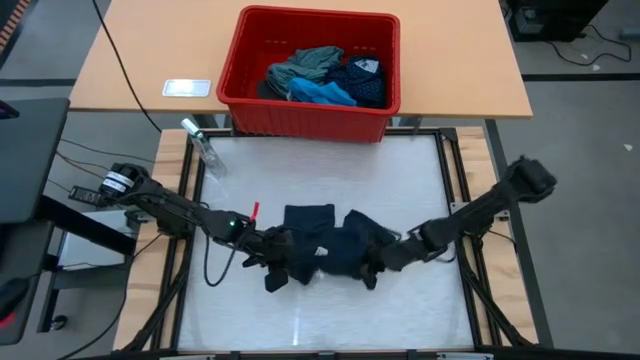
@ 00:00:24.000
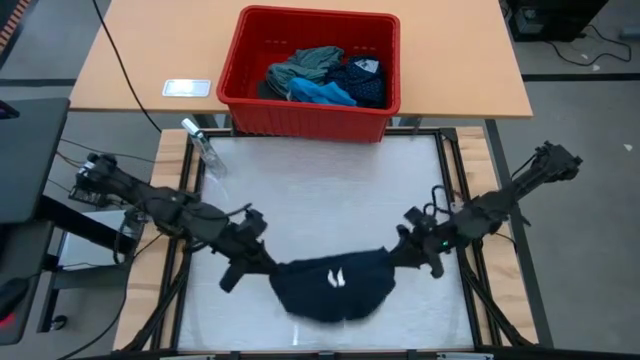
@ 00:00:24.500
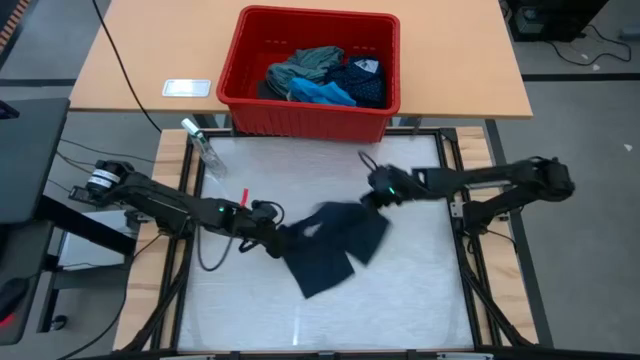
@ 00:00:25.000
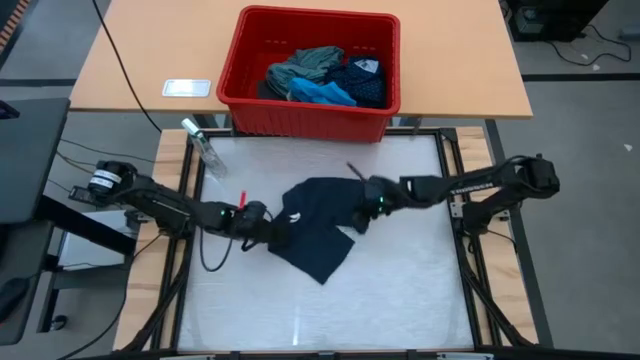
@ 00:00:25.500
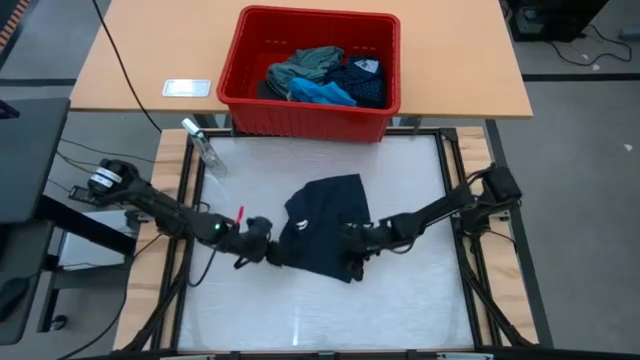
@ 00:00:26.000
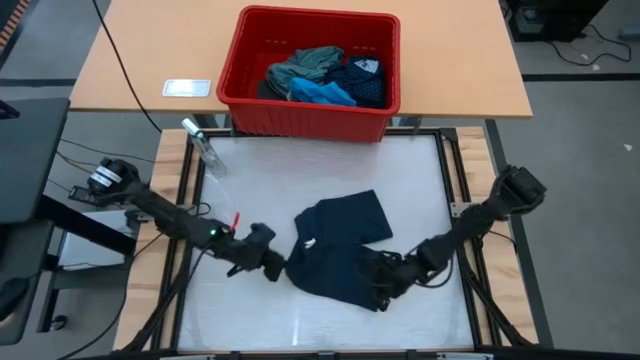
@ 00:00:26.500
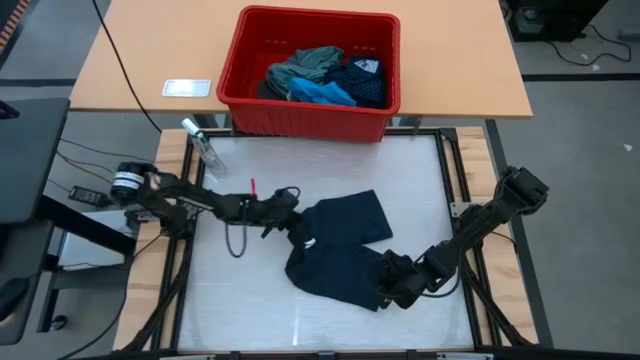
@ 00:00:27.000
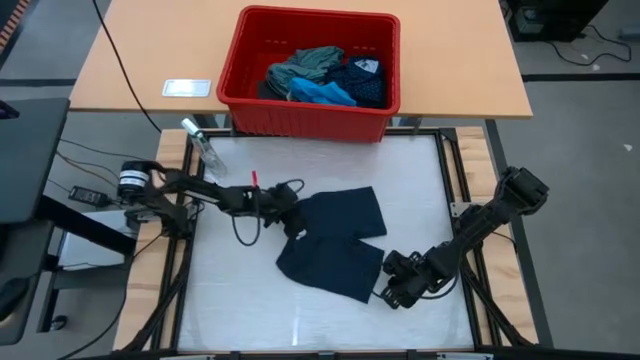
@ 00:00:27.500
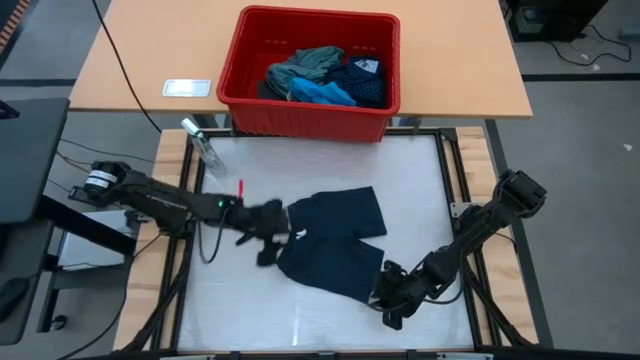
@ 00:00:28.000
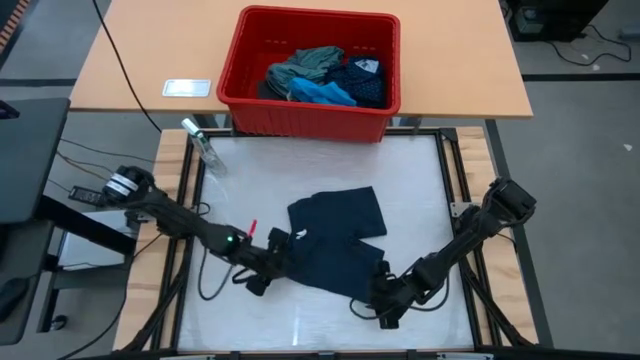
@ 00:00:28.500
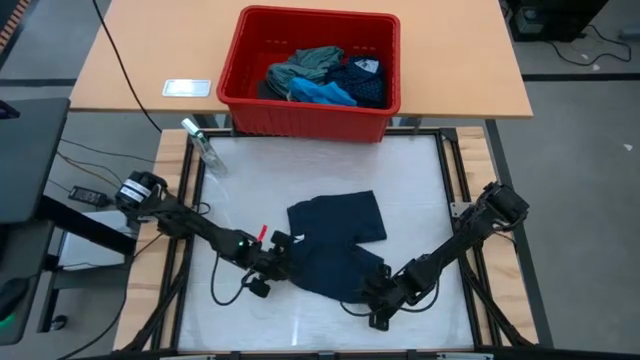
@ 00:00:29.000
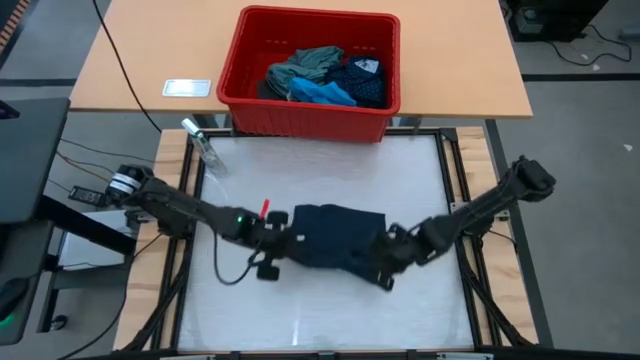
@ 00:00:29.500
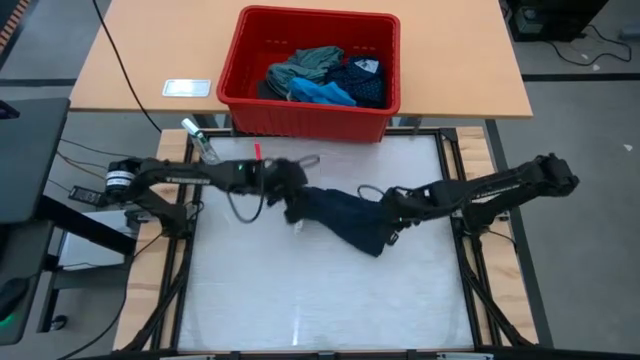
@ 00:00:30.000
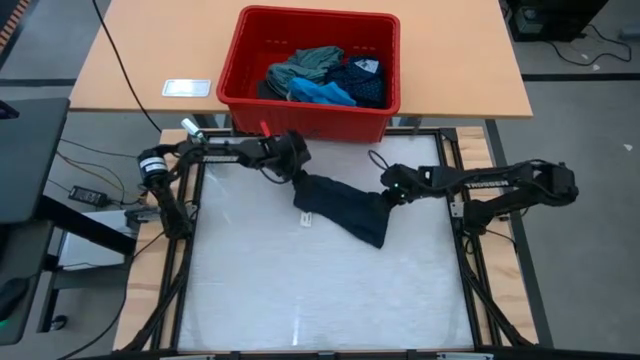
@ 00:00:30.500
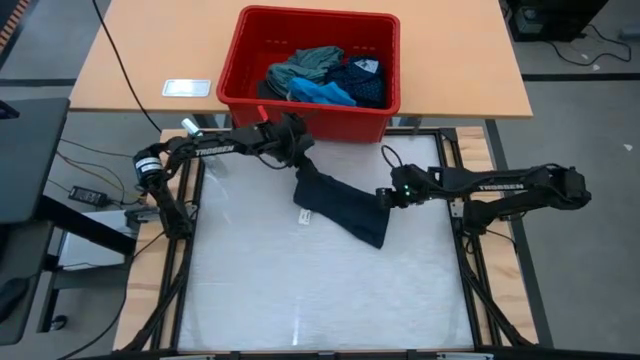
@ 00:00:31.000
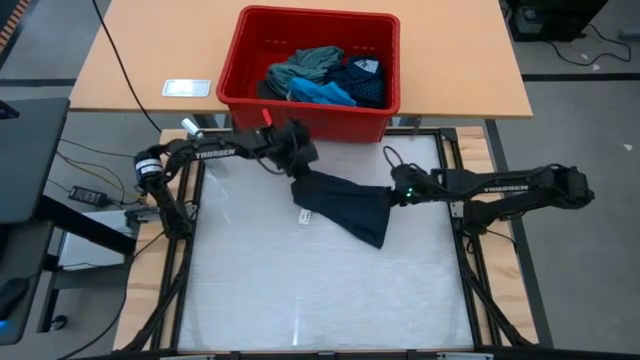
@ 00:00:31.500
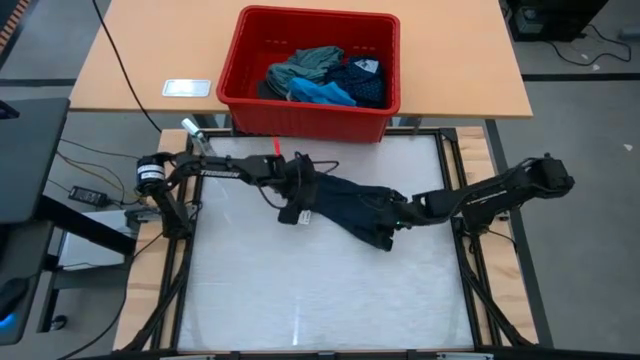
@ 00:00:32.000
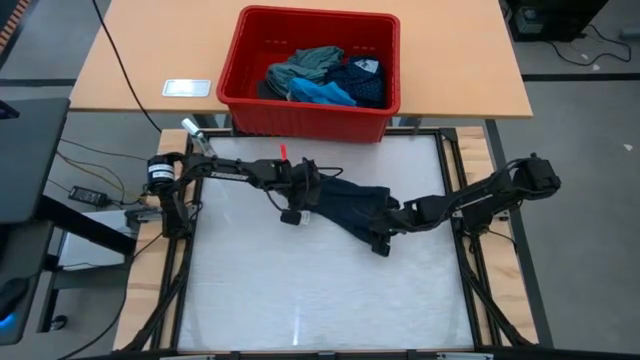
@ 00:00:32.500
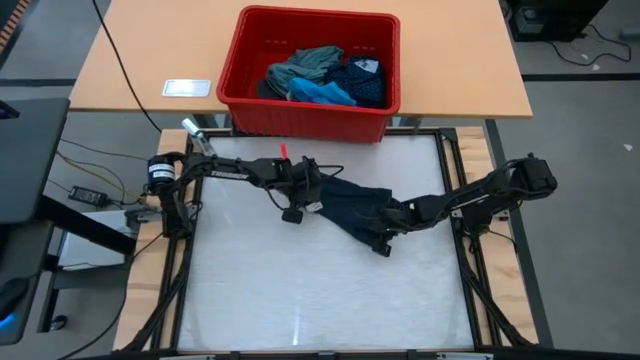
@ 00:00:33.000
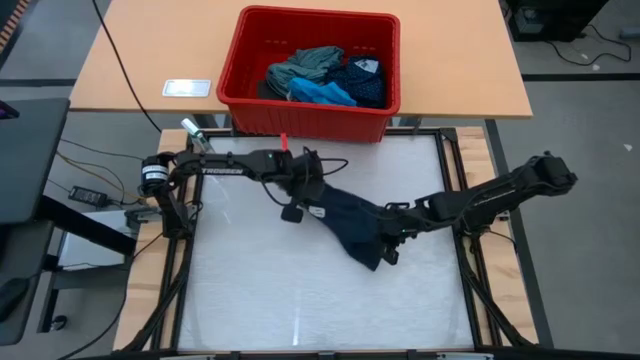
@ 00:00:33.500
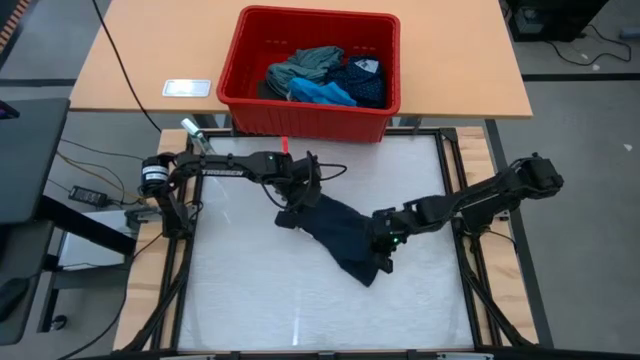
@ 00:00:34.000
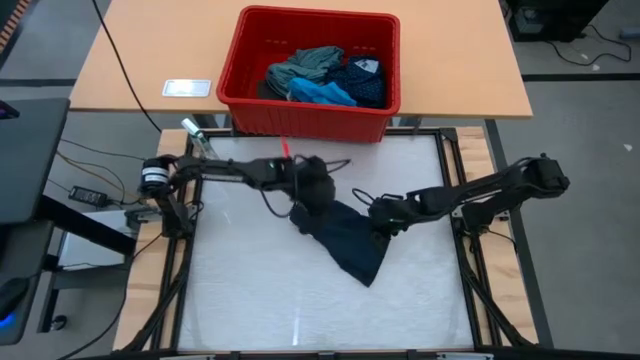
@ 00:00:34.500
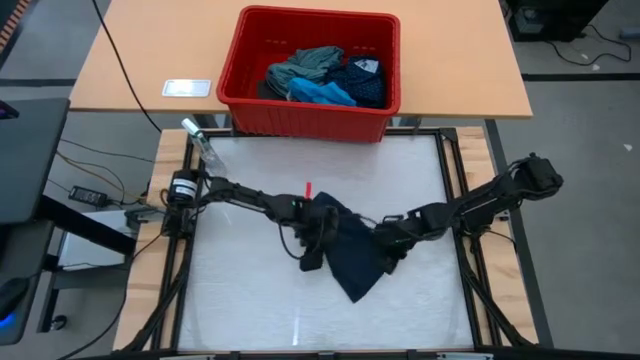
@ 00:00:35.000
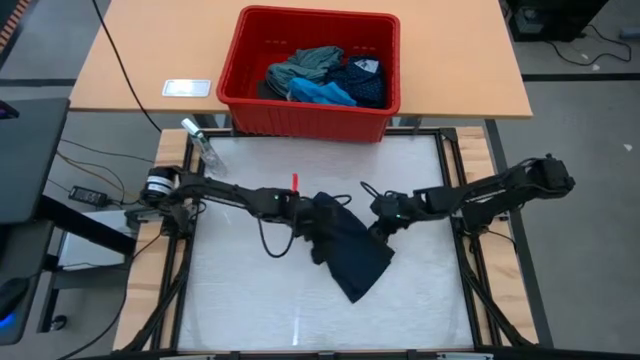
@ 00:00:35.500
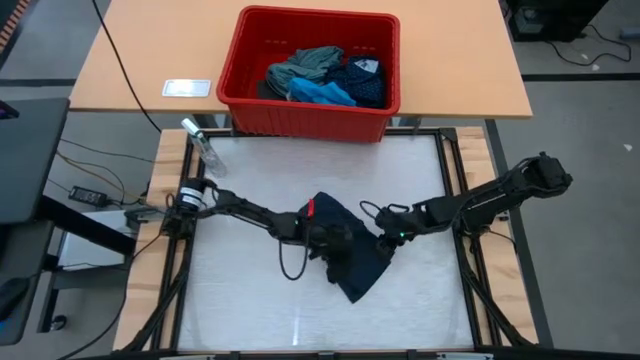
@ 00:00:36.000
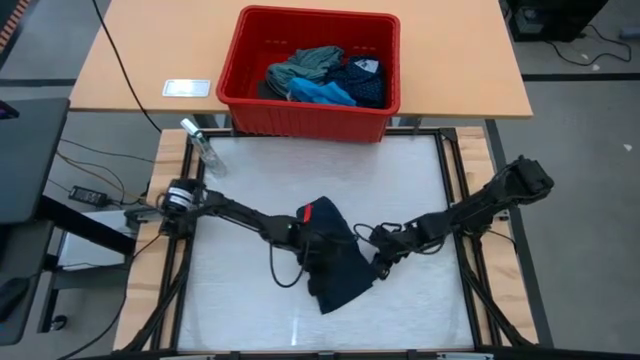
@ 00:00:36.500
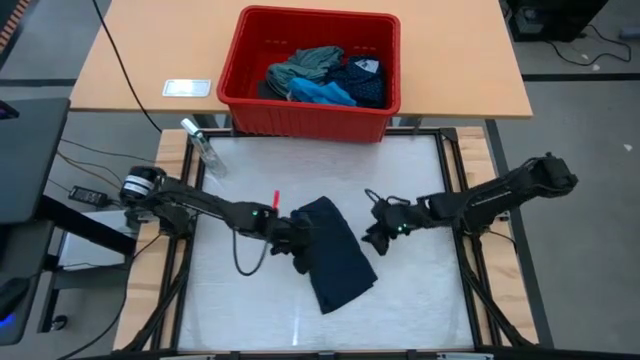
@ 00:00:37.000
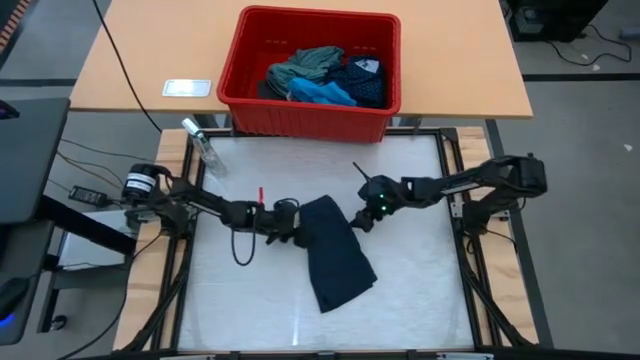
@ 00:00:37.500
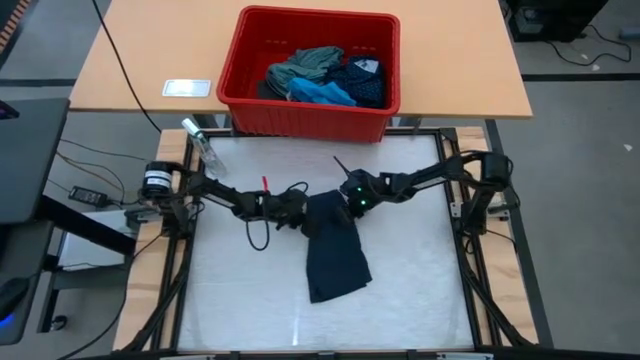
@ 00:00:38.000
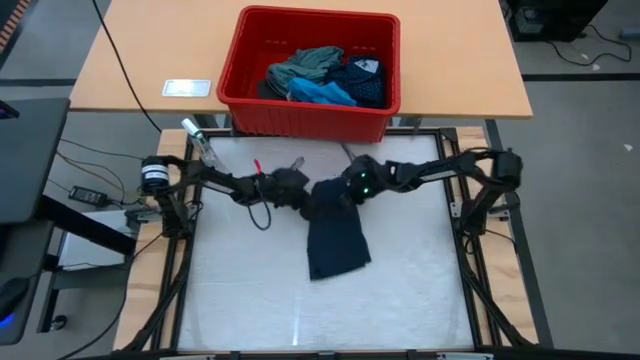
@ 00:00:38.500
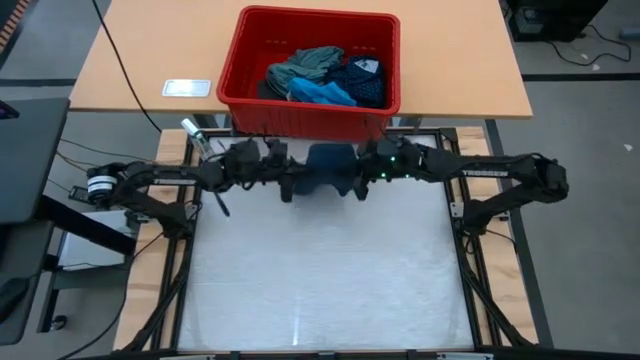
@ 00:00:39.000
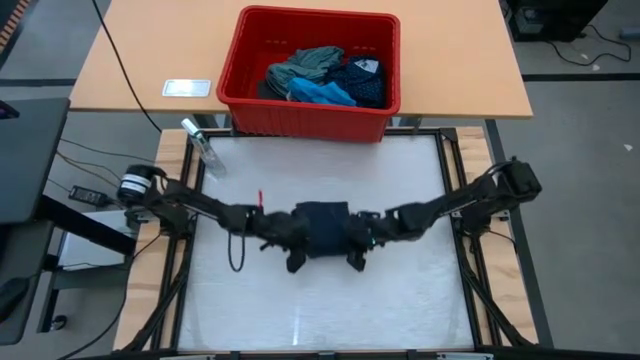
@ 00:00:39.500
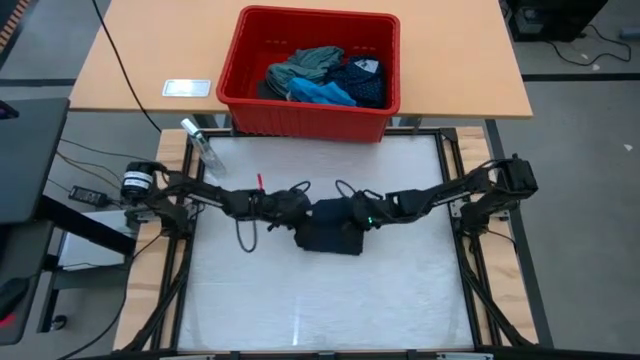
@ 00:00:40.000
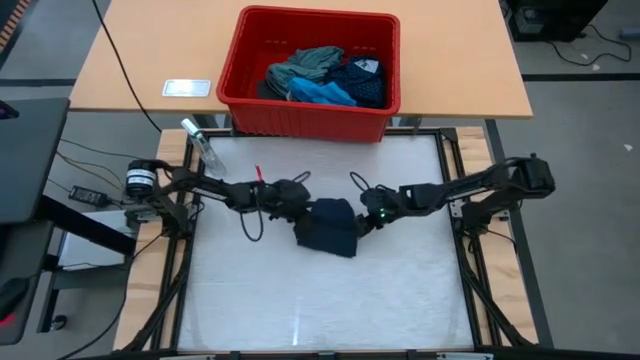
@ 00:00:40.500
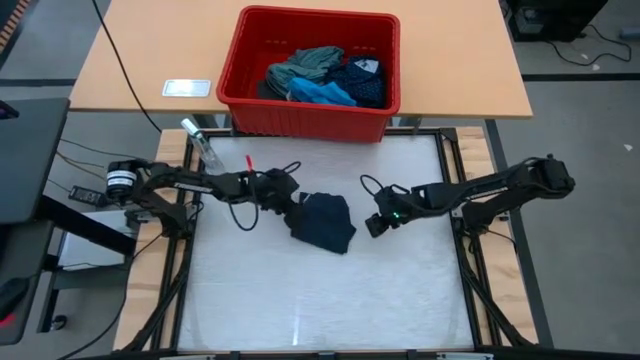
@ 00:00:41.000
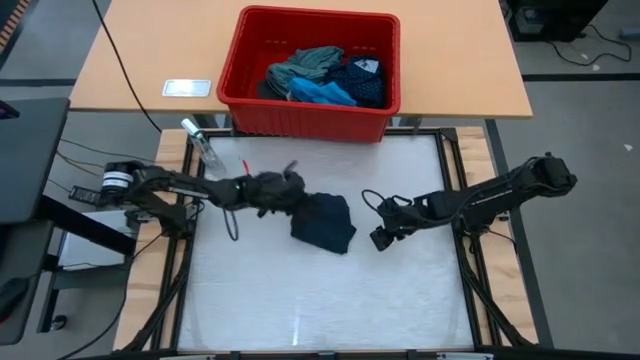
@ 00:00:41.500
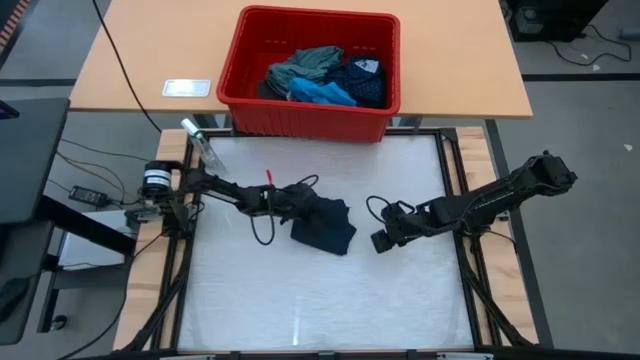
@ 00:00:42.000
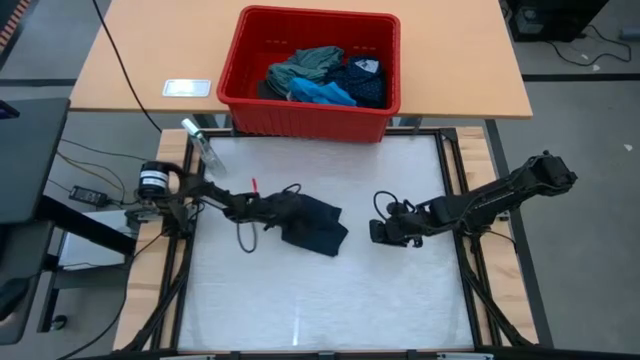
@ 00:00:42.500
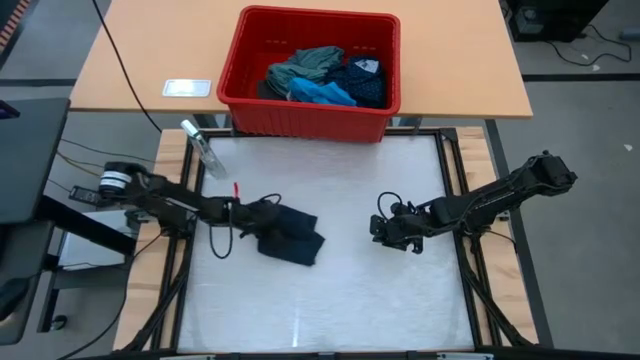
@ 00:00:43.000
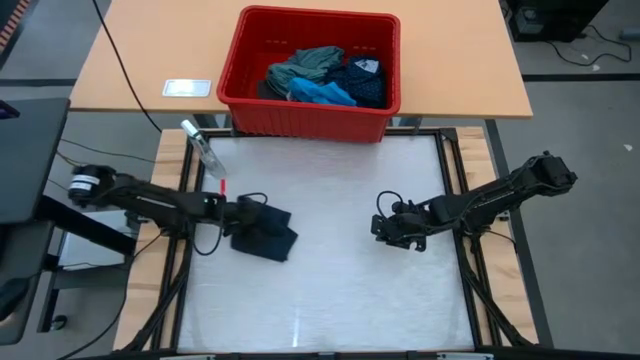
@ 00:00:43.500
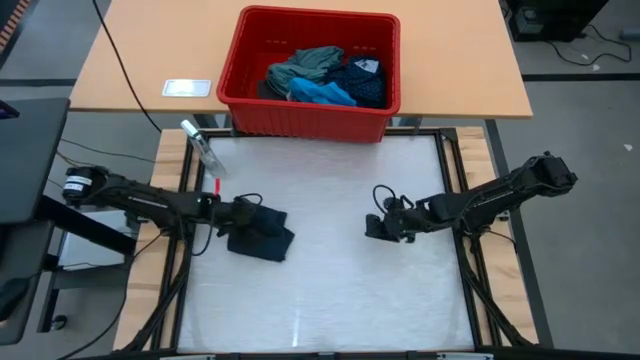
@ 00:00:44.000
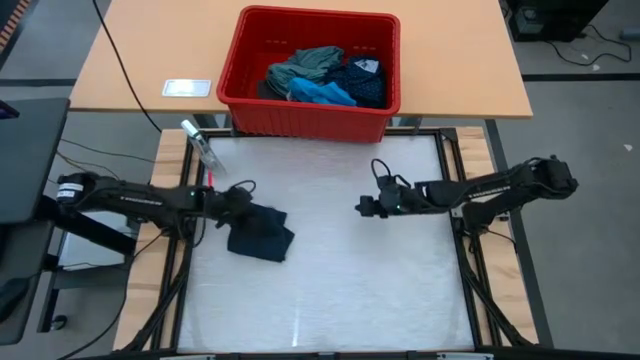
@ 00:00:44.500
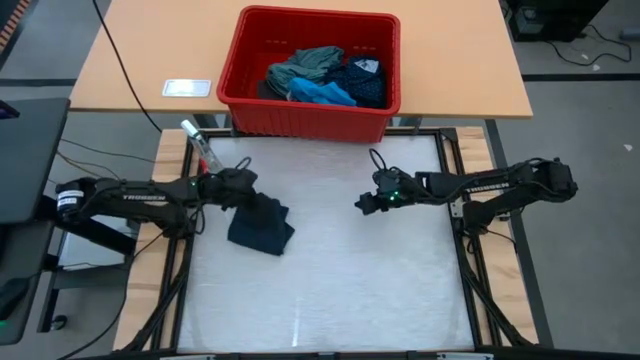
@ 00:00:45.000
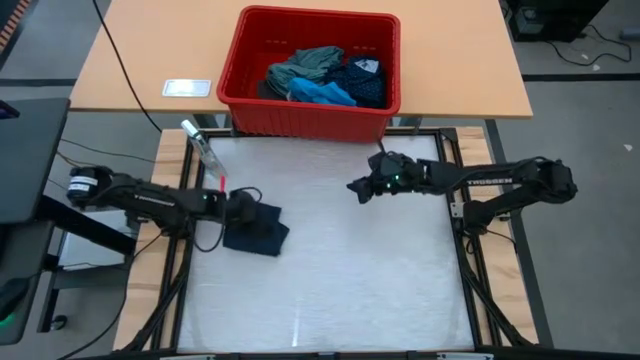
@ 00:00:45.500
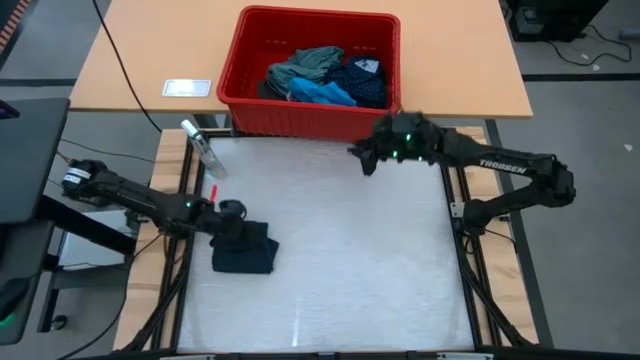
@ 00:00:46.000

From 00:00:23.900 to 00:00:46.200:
Task: Fold laundry
Fold the dark blue shorts
